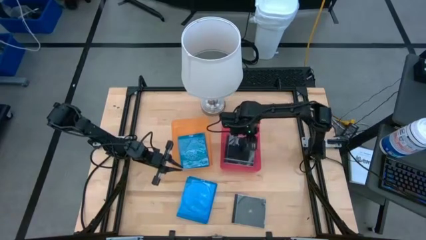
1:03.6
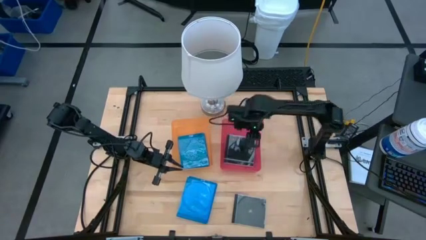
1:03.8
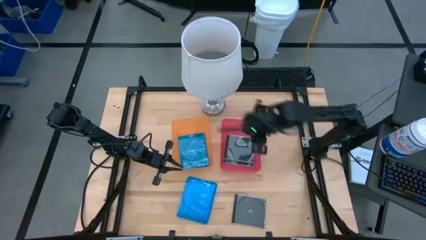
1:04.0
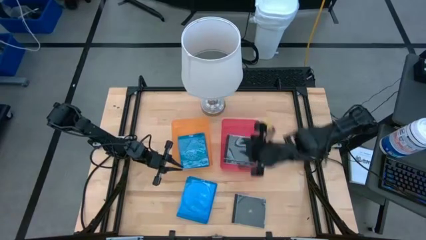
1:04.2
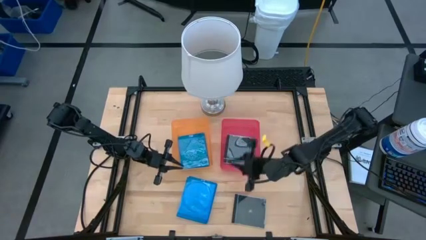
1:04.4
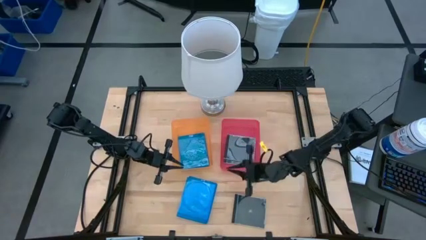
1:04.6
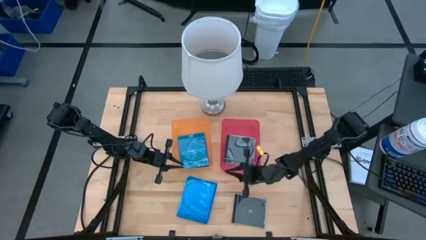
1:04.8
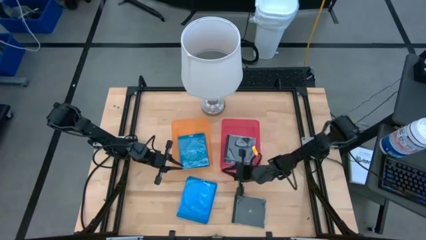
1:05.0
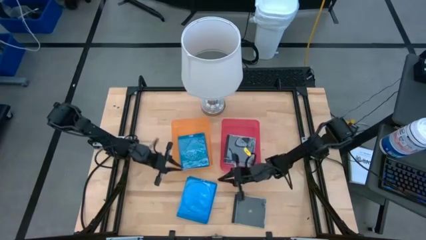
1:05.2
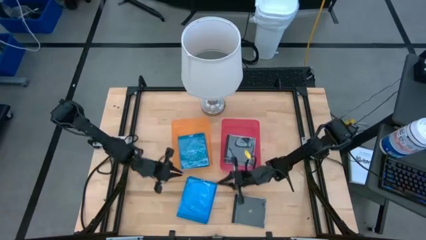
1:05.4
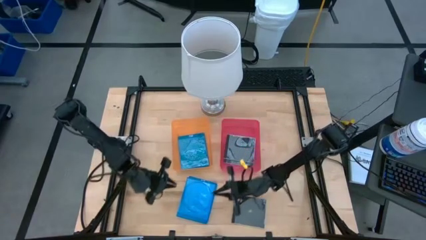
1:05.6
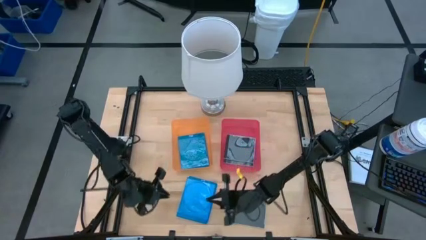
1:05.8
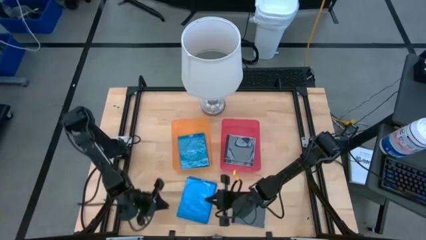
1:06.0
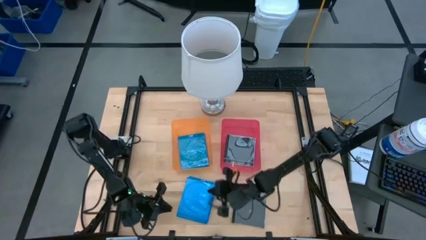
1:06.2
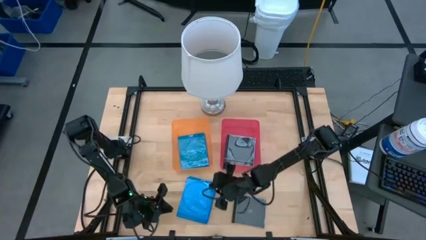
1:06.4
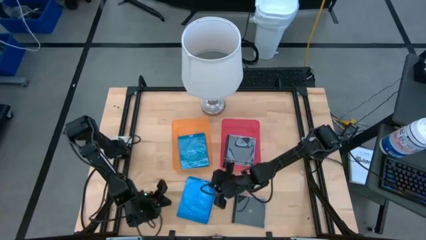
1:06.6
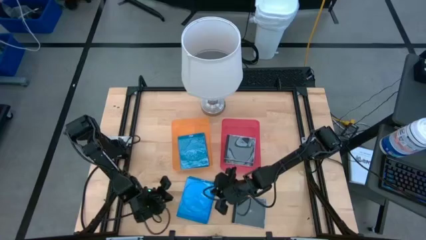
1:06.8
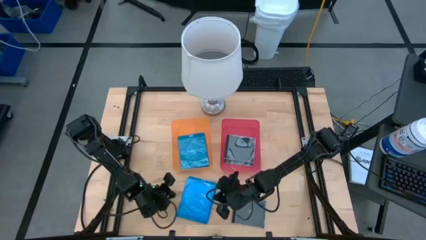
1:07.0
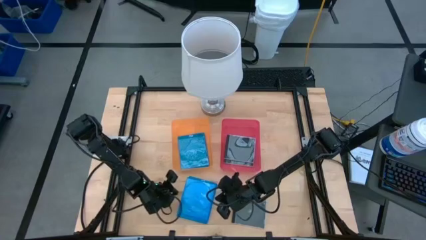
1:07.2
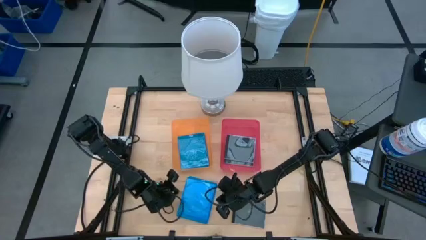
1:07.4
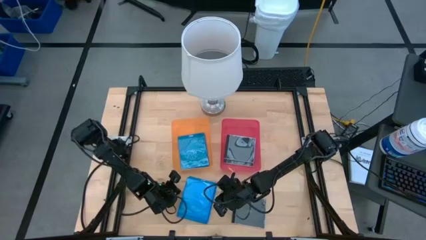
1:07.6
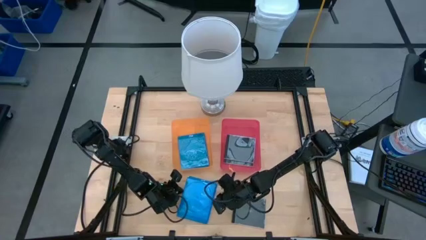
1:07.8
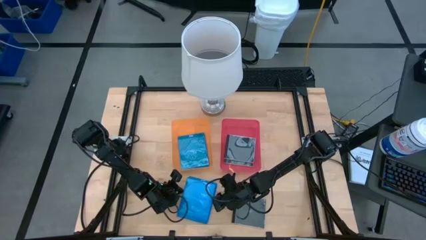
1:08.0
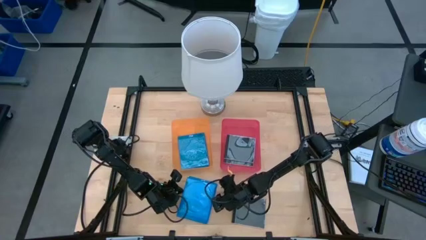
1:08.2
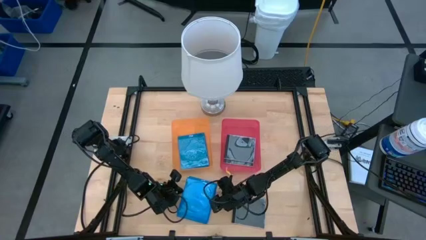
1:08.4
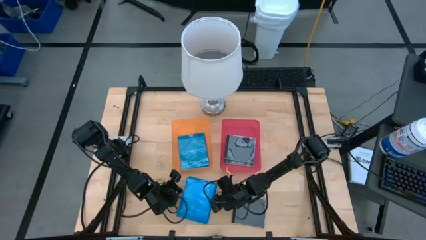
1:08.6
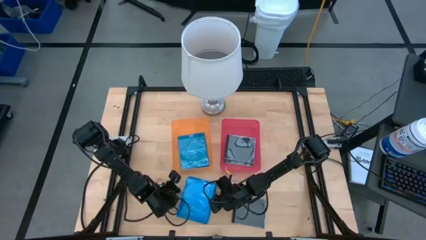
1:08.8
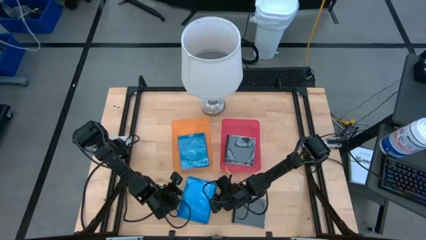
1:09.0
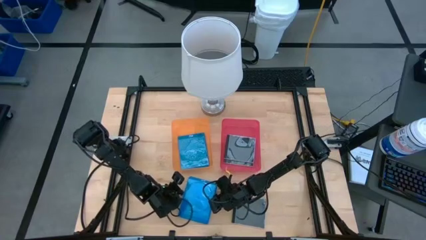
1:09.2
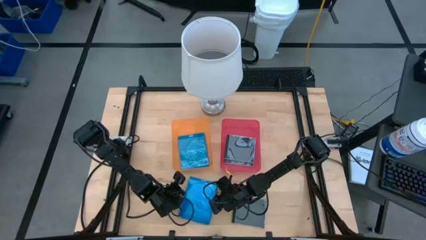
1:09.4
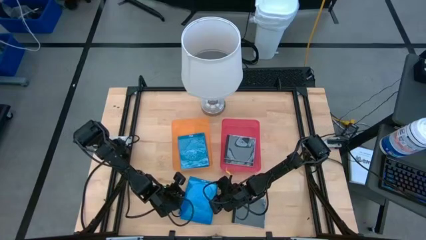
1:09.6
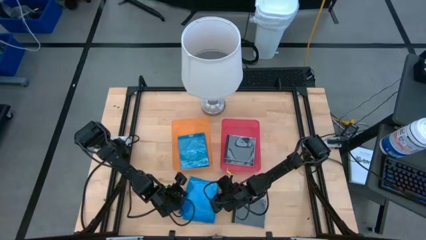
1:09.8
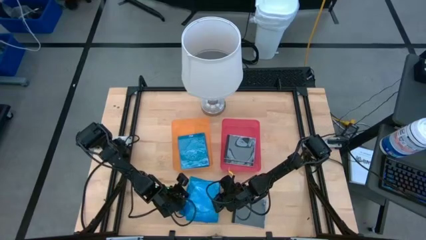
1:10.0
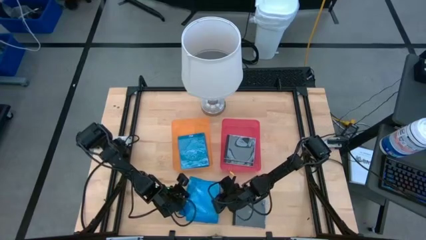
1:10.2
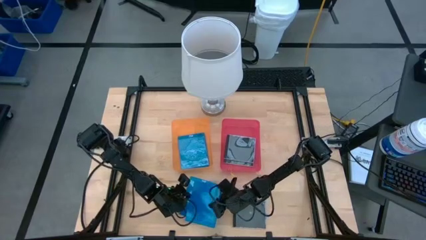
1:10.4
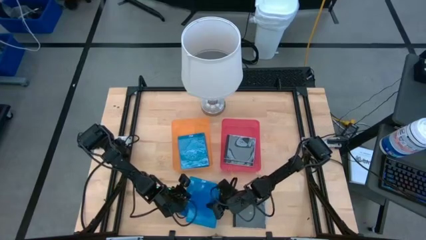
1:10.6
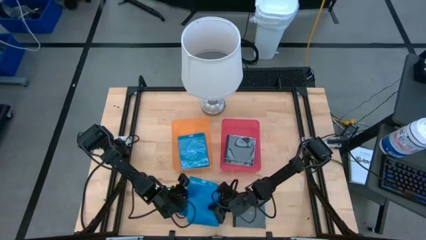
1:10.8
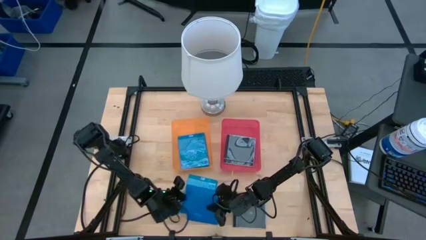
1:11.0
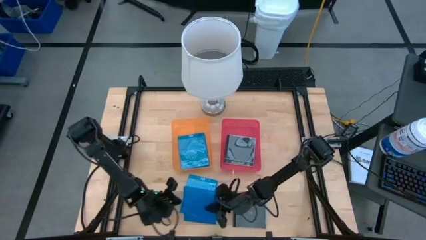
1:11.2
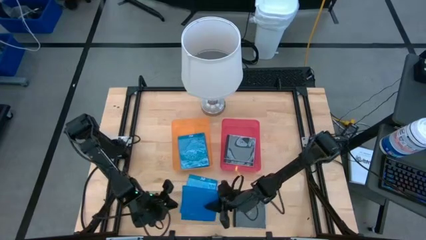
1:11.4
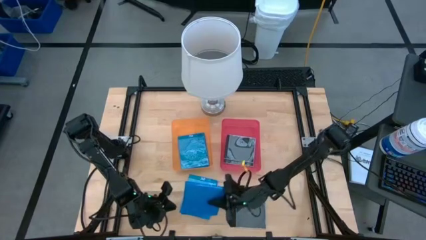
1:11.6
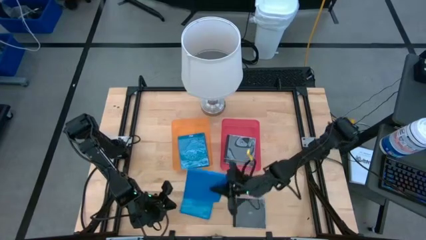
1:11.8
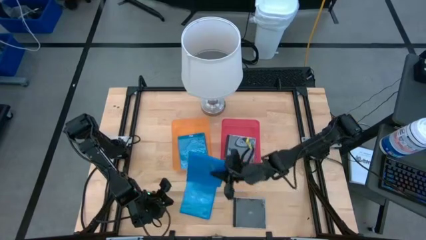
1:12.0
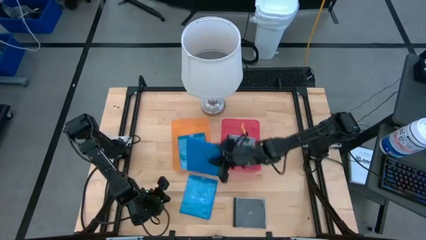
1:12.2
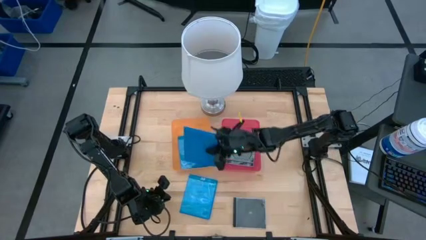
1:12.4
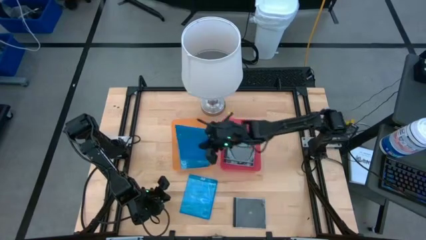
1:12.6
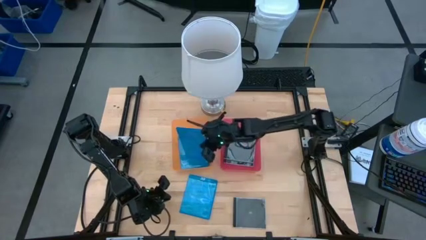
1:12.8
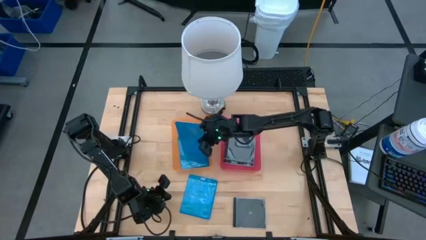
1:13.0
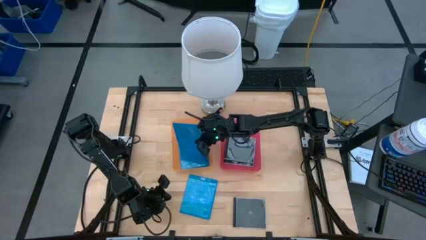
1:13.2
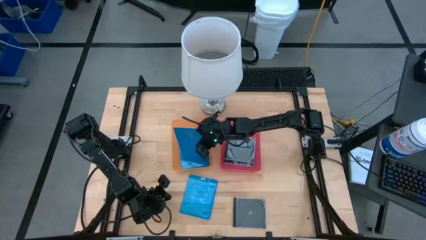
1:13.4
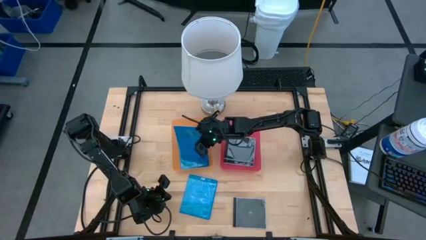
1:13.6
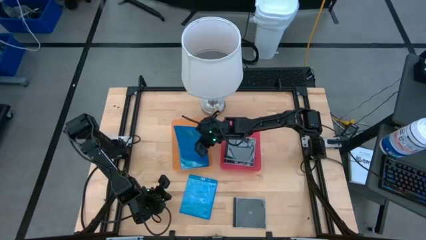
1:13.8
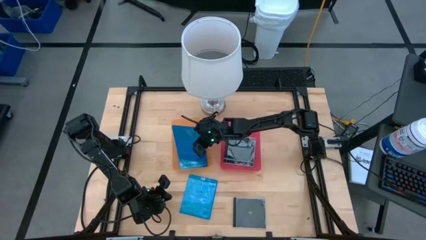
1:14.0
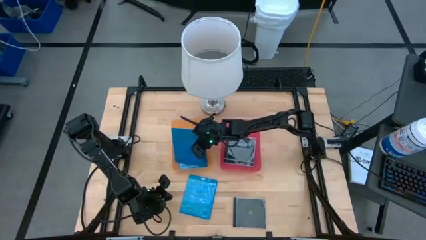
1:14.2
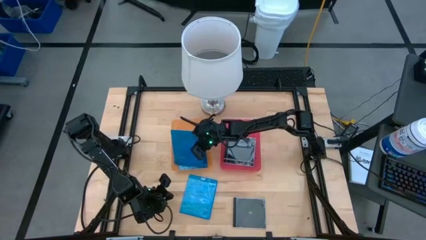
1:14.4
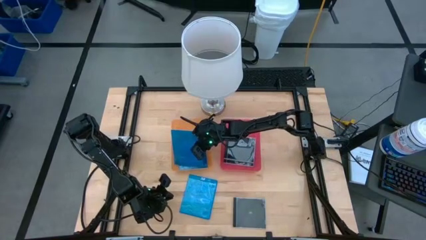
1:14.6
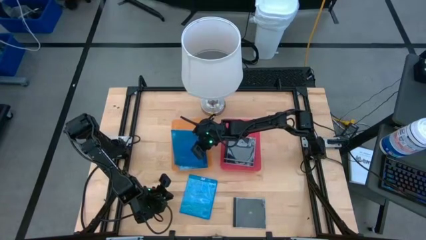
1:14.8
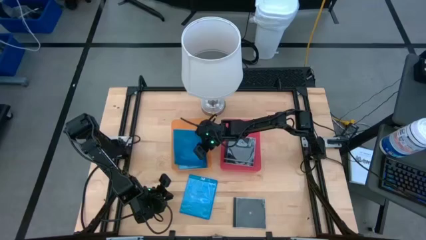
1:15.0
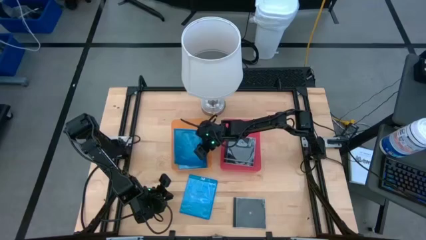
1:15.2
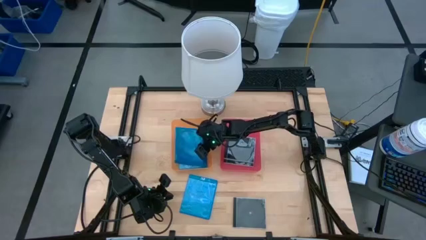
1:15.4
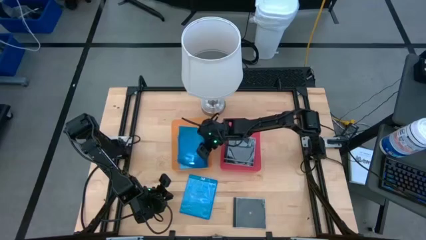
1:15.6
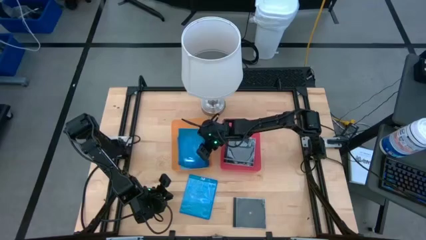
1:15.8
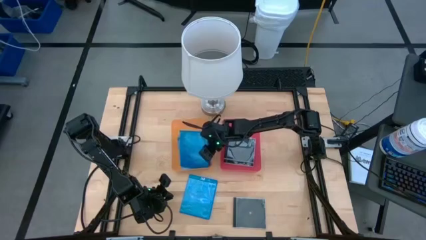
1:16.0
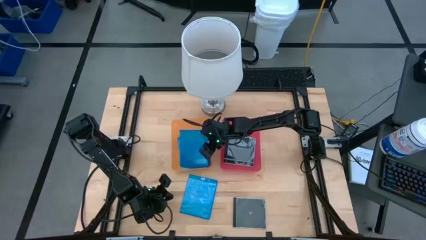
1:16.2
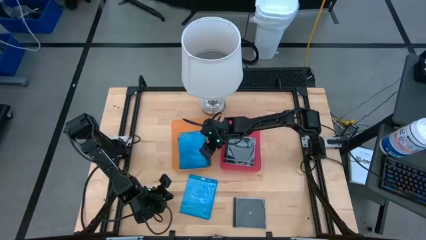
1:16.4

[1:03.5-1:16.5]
Task: Pick & place jewel cases by type
Put the blue CD case into the orange bin
